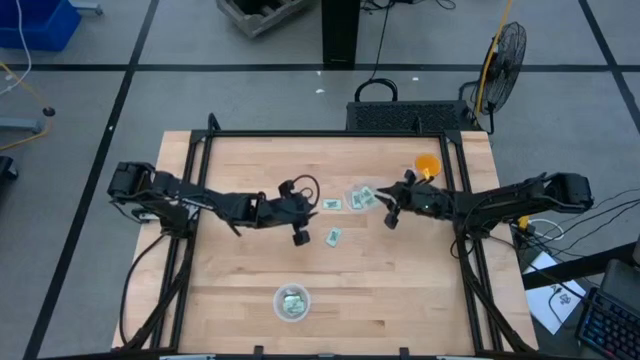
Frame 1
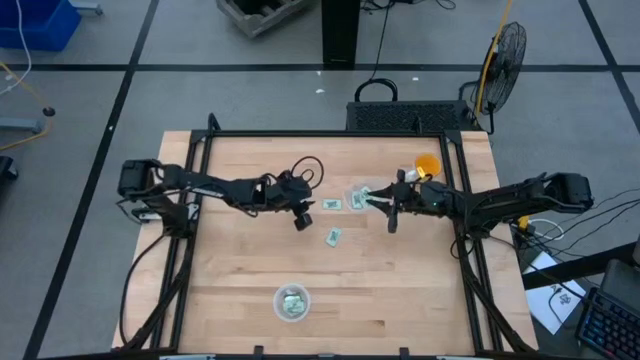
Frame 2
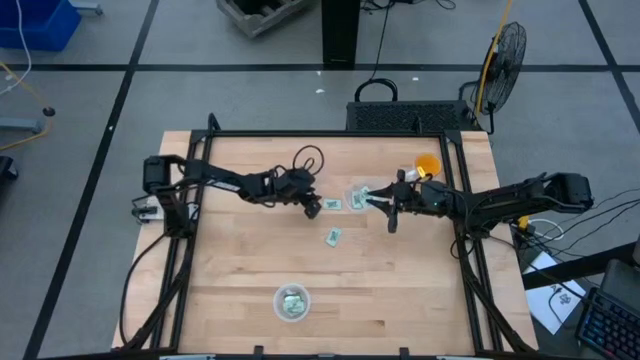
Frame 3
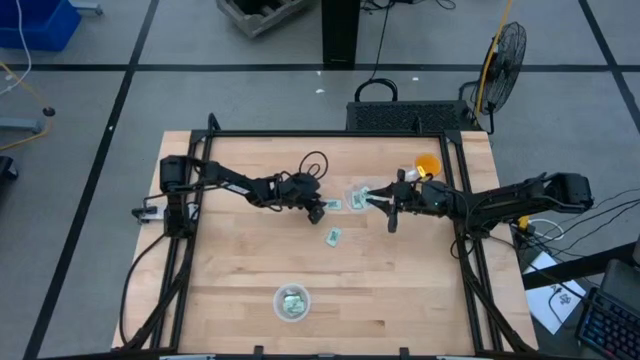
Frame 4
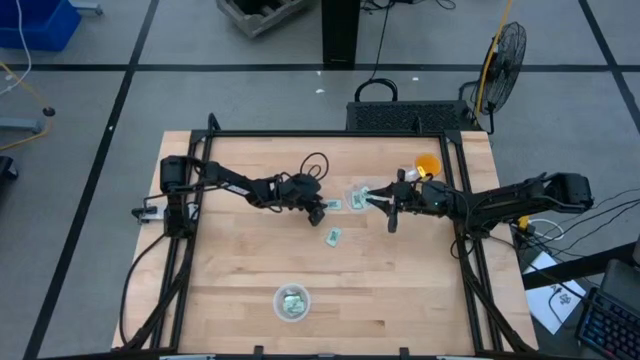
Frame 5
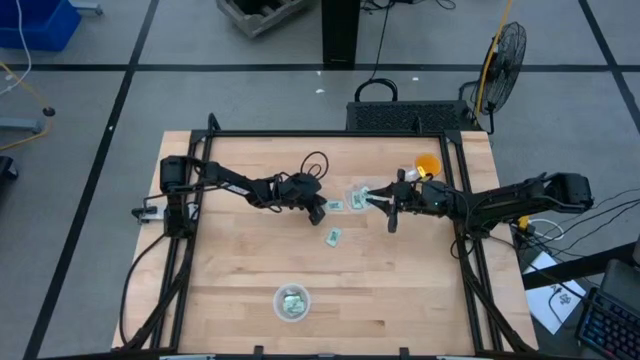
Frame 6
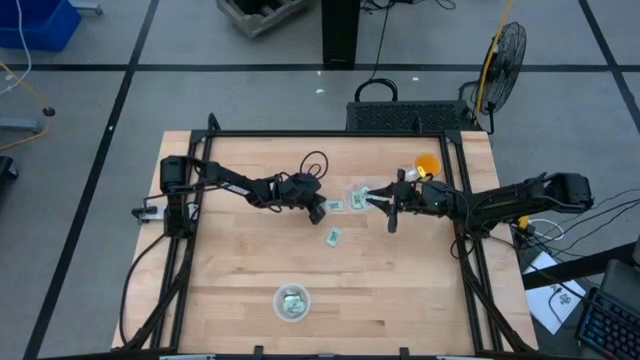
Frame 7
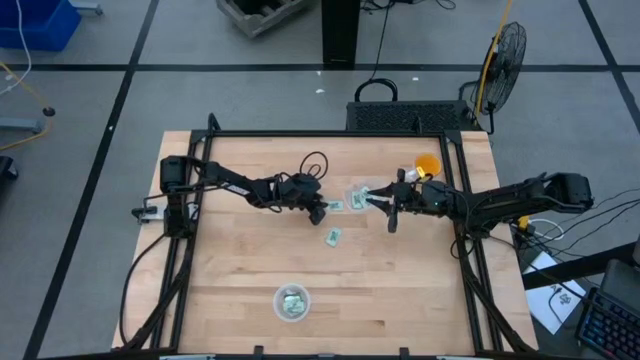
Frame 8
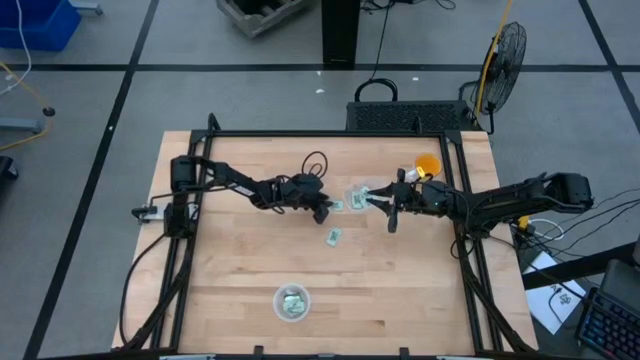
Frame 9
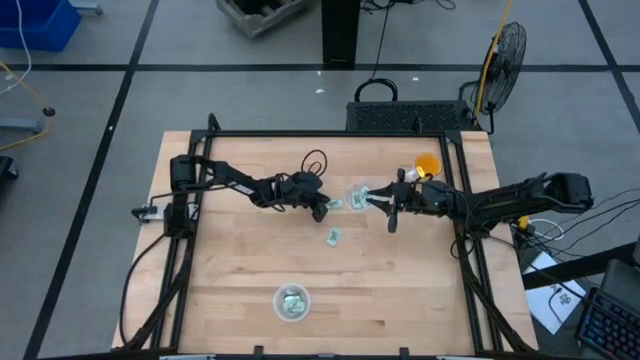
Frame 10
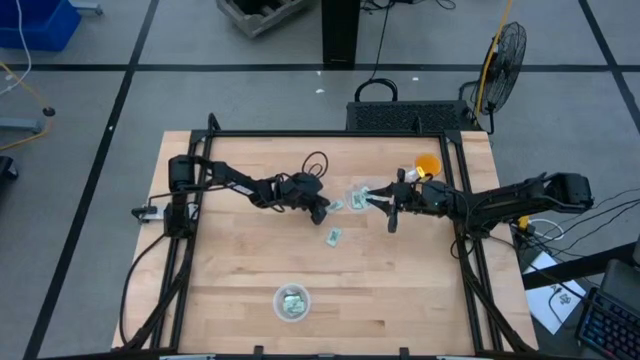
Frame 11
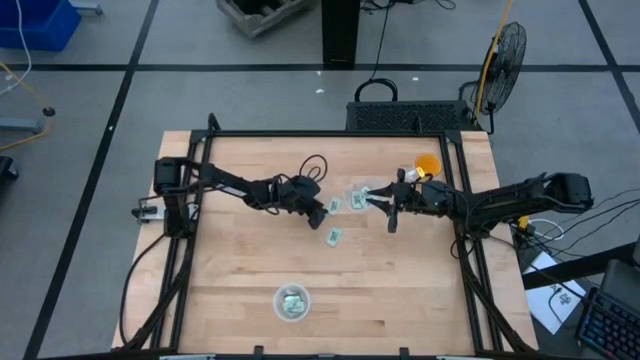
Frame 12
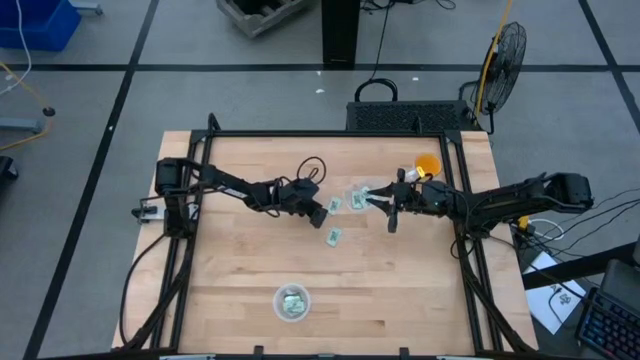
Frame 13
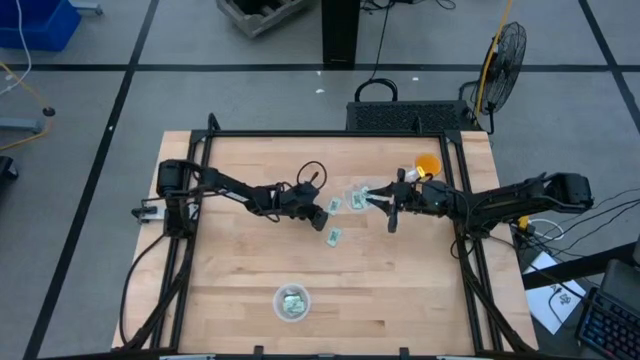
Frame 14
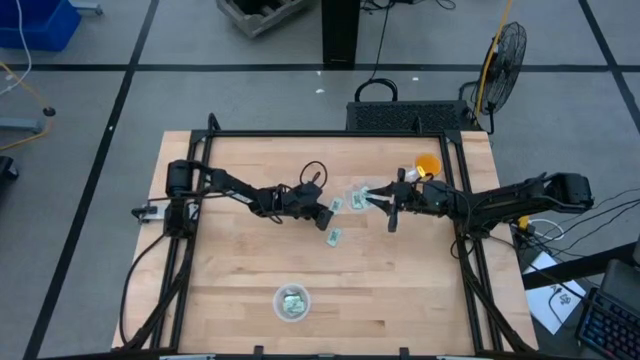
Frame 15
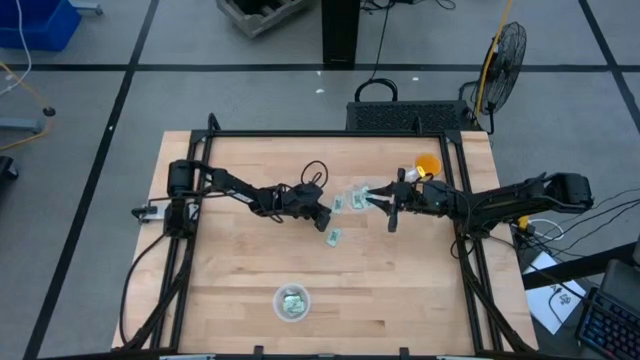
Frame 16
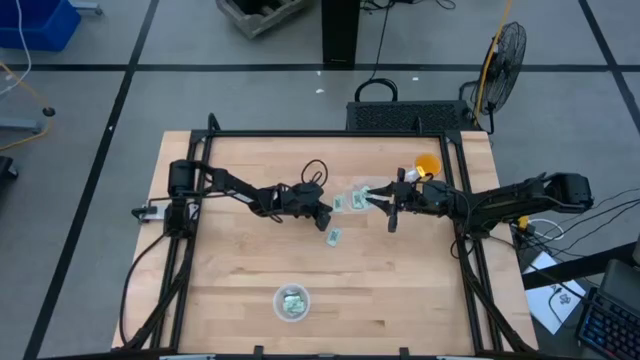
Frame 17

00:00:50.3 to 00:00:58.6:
Task: Pick and place Stevia / Truvia into bins
Put the stevia packet into the transparent container

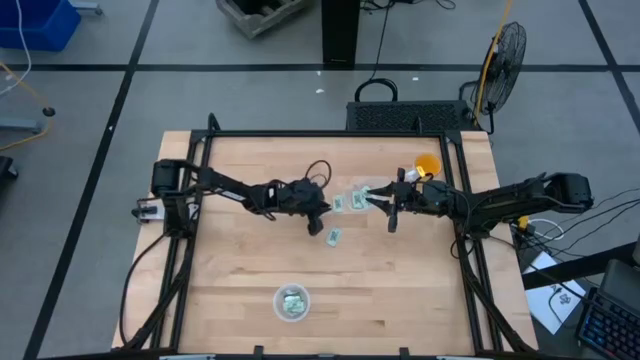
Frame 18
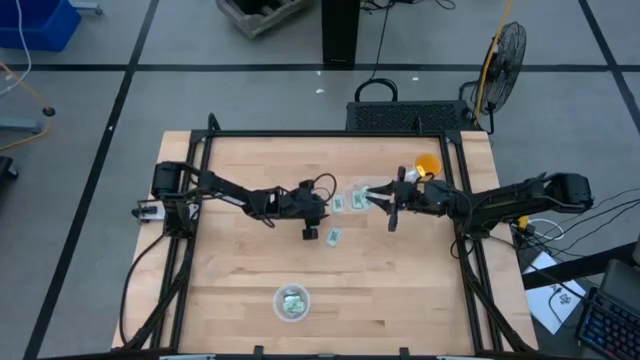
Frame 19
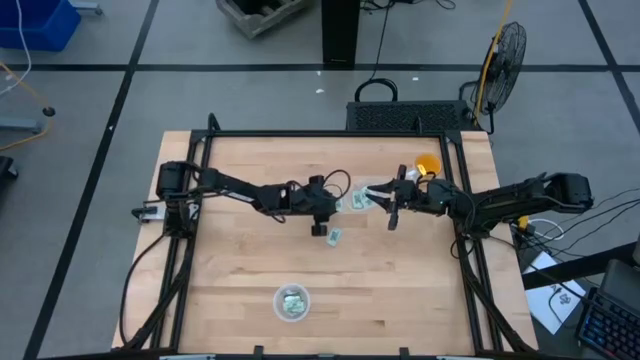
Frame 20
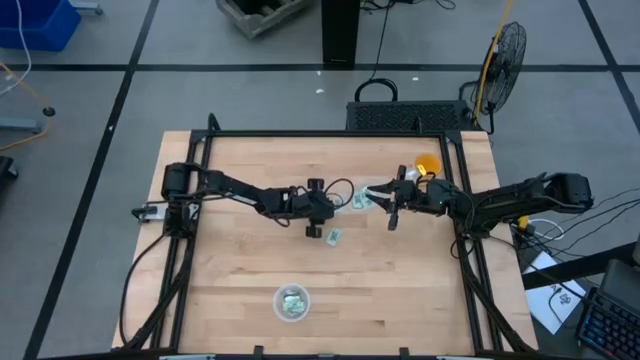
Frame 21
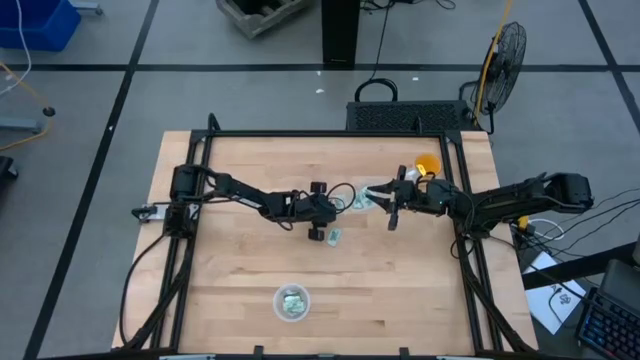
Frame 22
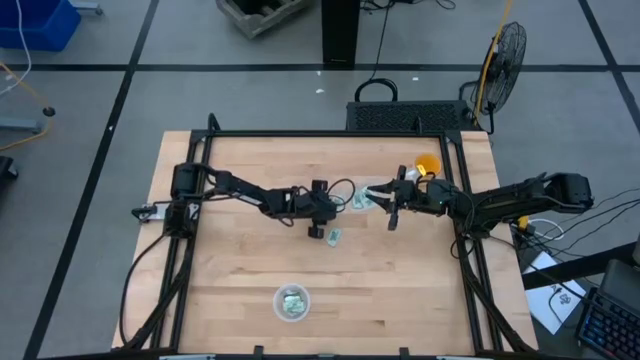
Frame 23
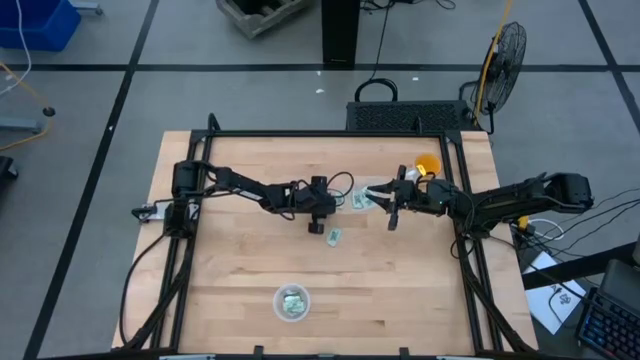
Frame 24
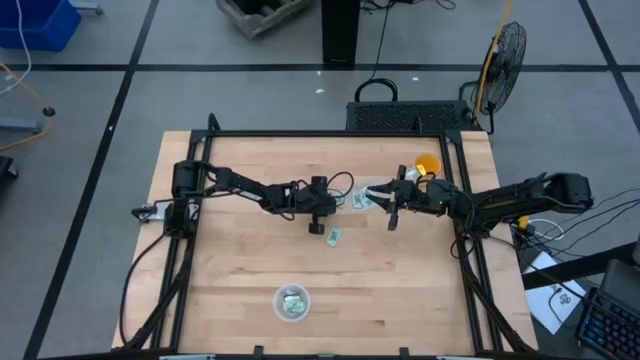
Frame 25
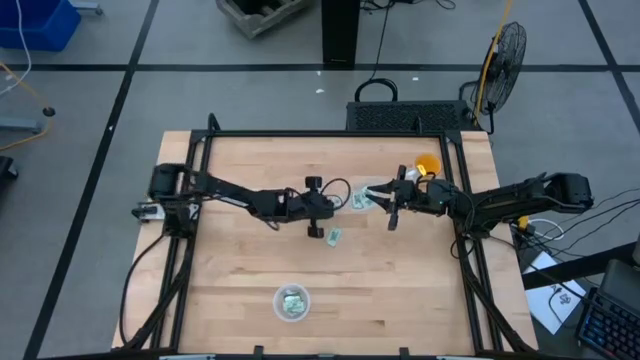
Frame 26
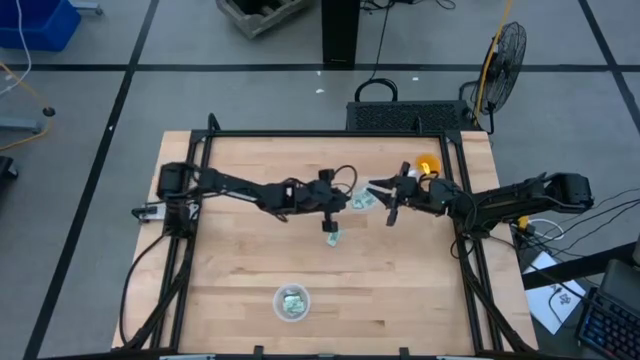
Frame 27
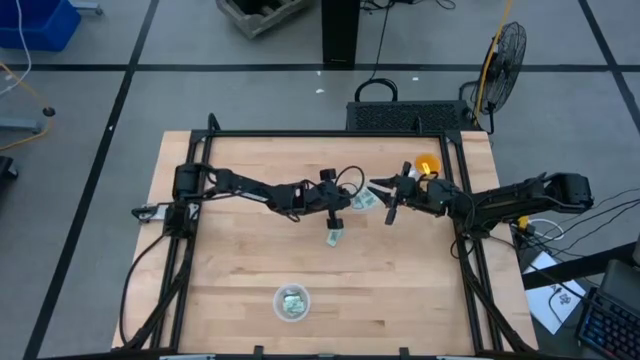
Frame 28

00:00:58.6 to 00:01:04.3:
Put the stevia packet into the transparent container

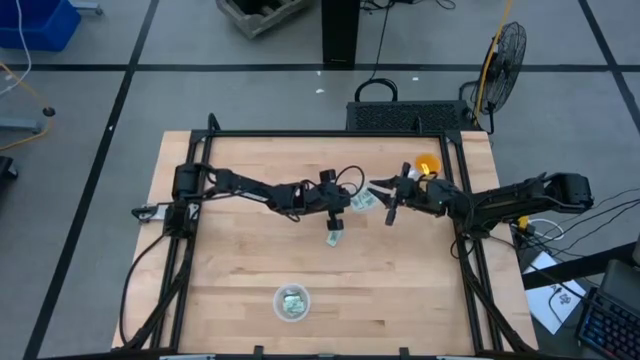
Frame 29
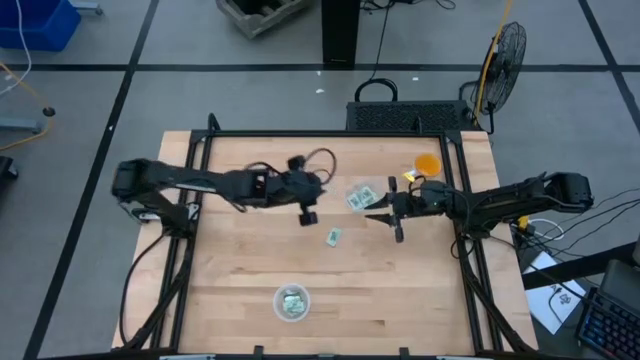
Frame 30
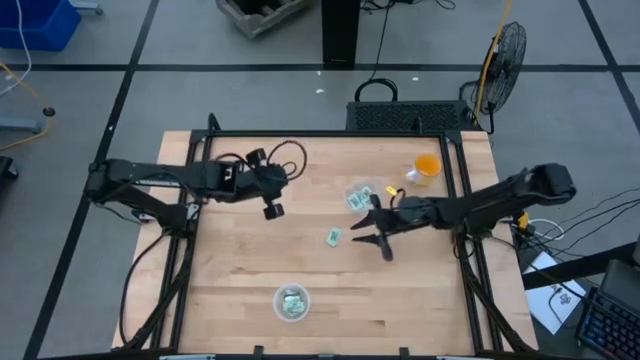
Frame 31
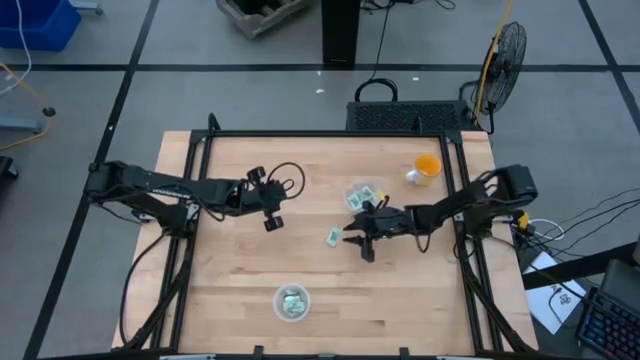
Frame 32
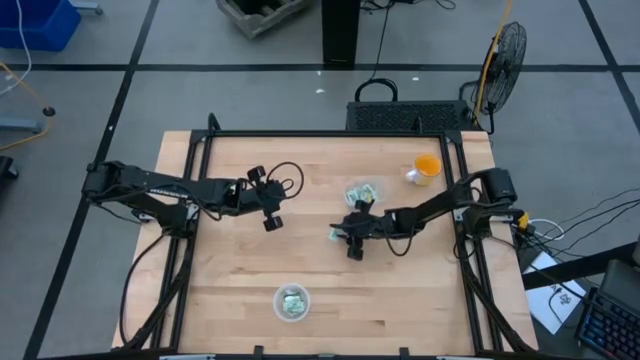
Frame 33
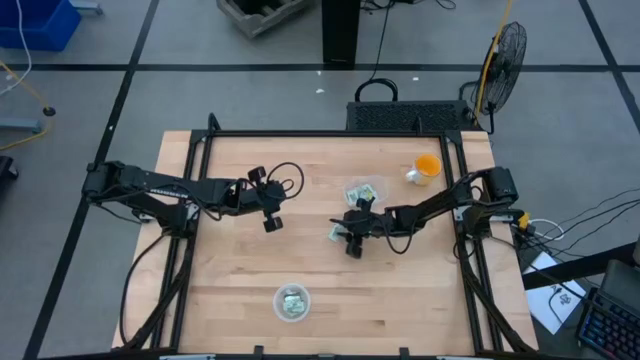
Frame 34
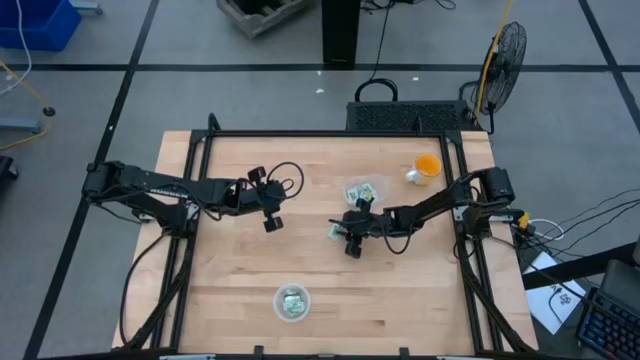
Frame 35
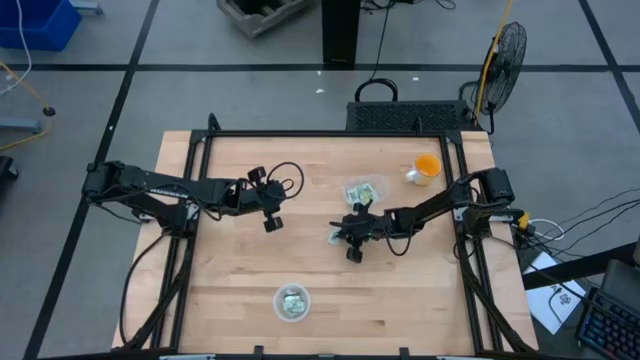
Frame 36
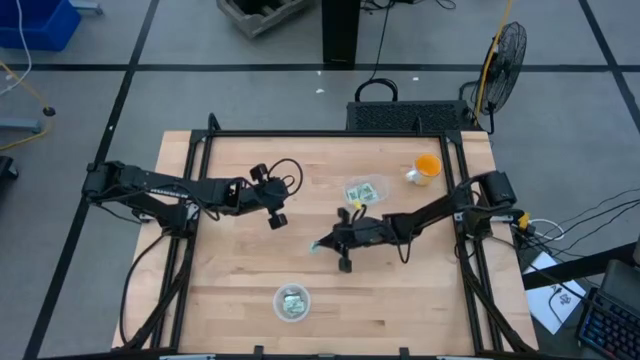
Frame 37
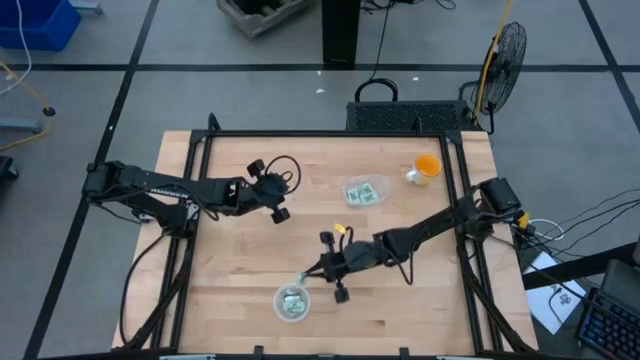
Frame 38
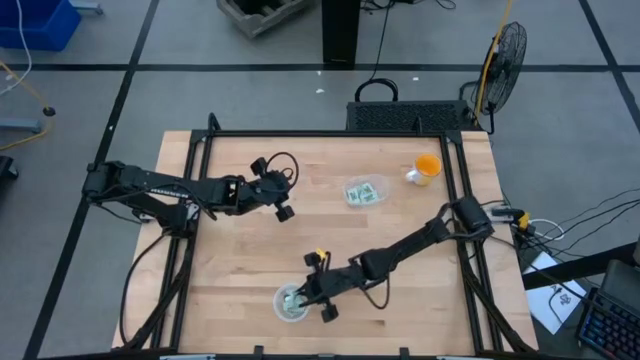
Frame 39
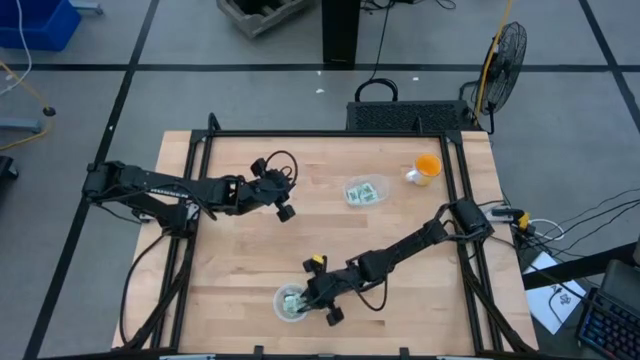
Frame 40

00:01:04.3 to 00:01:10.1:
Put the stevia packet into the transparent container

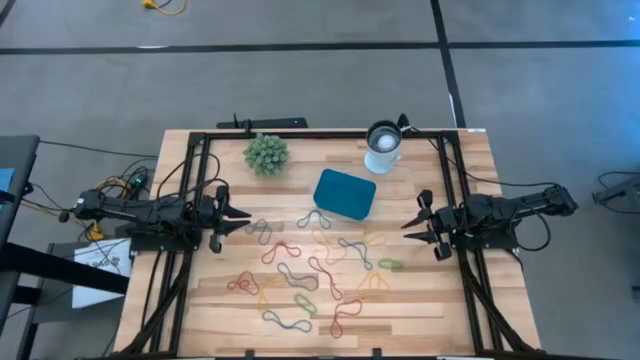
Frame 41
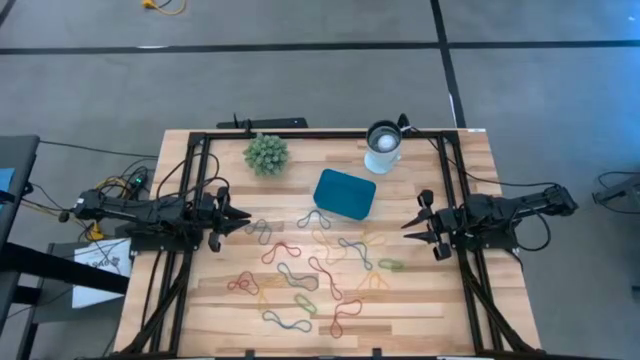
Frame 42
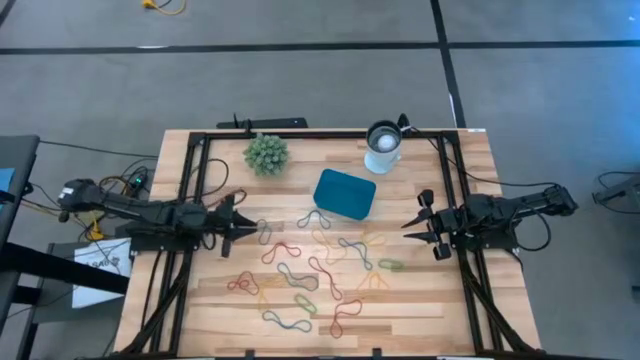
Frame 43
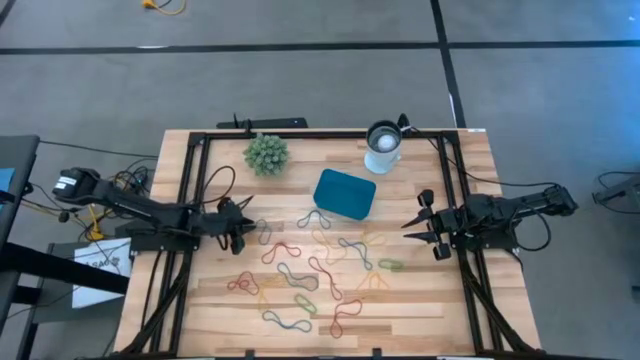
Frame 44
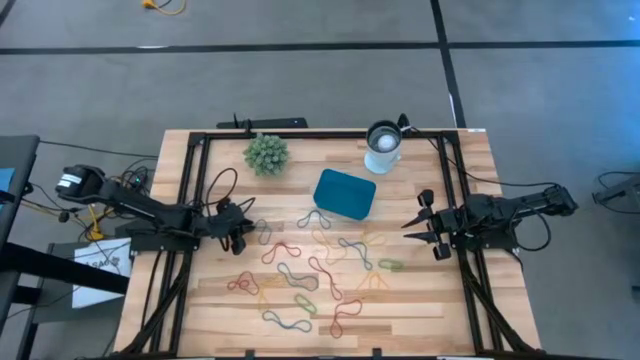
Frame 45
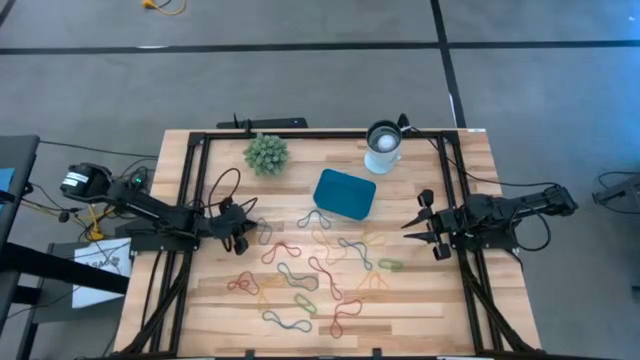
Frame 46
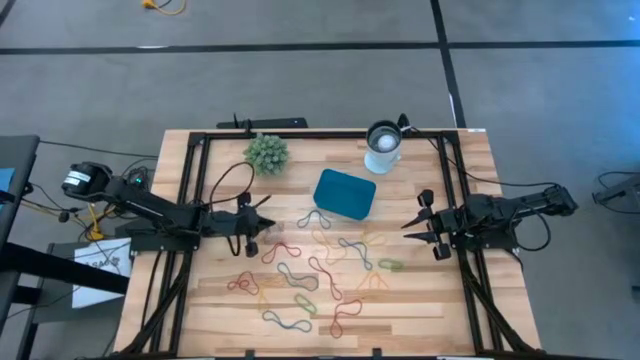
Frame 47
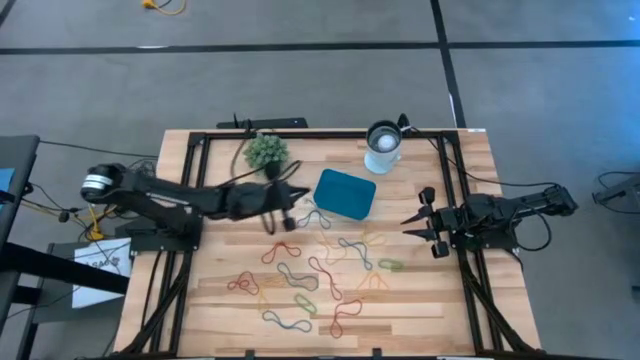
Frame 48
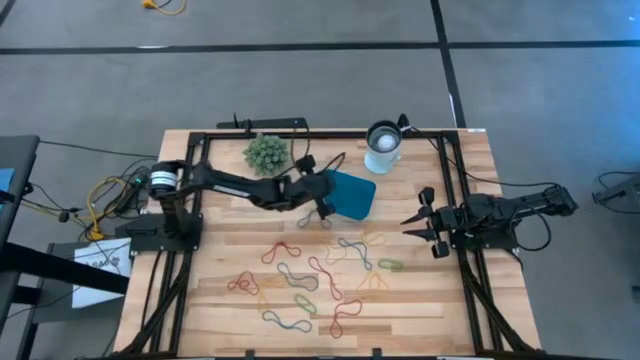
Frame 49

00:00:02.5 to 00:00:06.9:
Task: Pick and place items into bin
Put the blue rubber band into the blue bin
